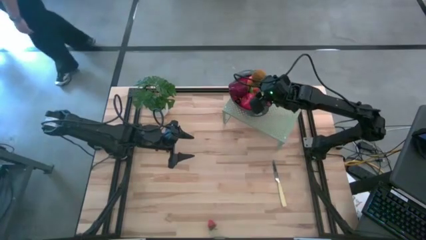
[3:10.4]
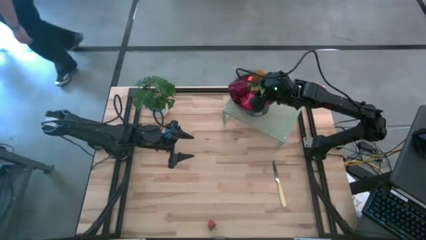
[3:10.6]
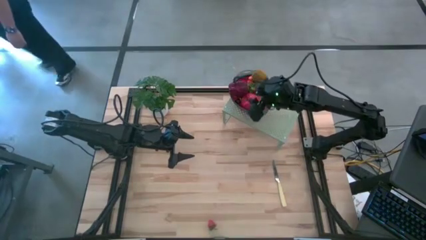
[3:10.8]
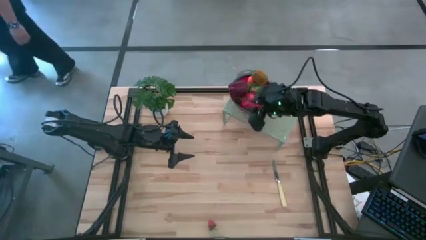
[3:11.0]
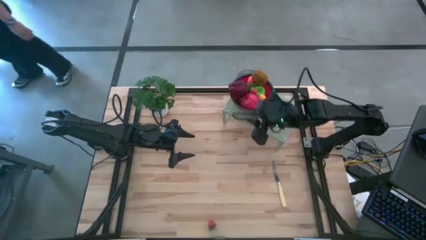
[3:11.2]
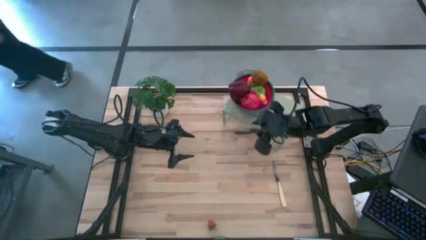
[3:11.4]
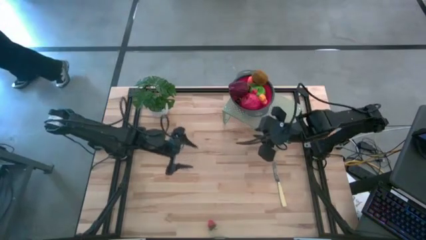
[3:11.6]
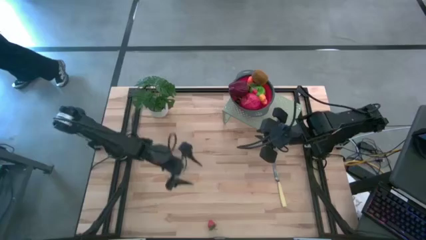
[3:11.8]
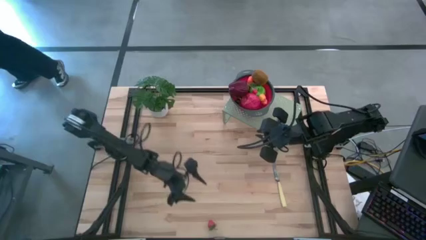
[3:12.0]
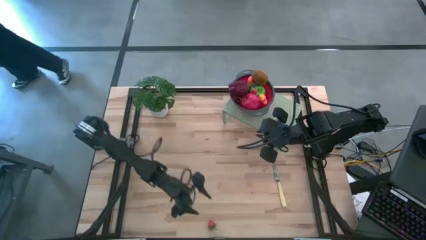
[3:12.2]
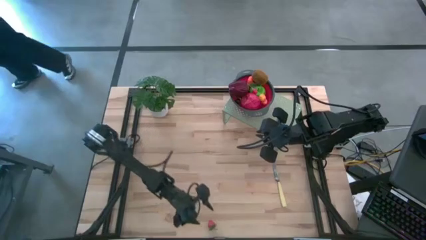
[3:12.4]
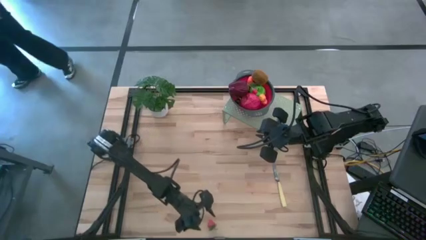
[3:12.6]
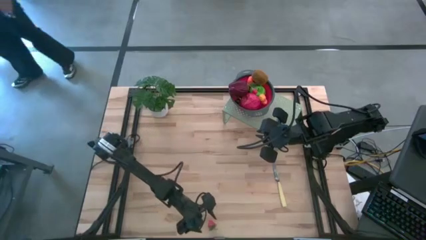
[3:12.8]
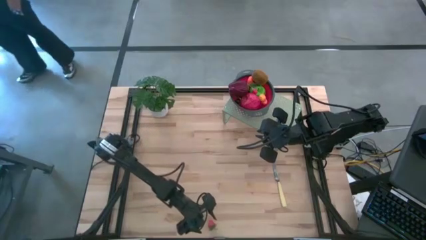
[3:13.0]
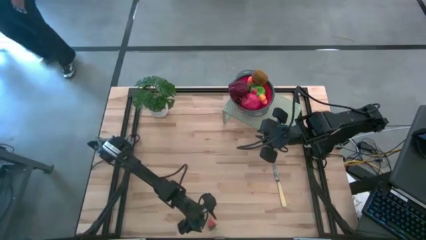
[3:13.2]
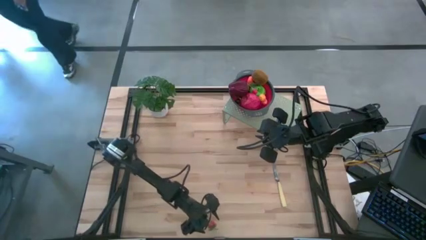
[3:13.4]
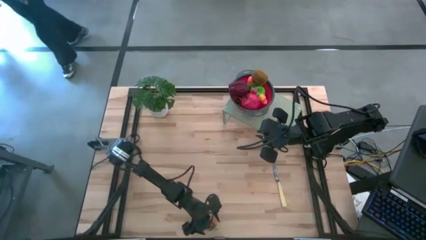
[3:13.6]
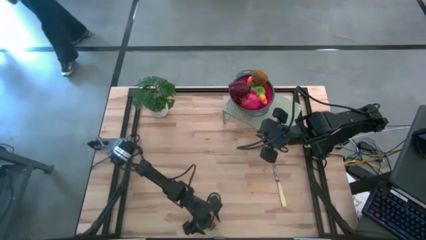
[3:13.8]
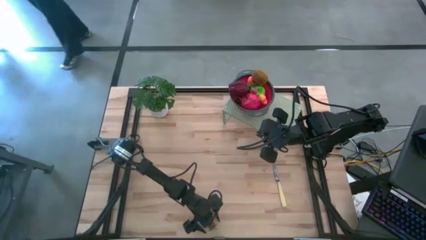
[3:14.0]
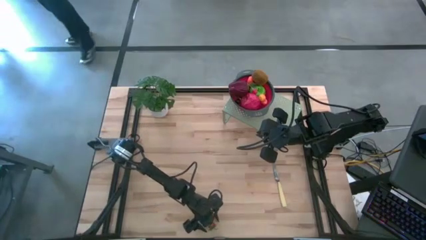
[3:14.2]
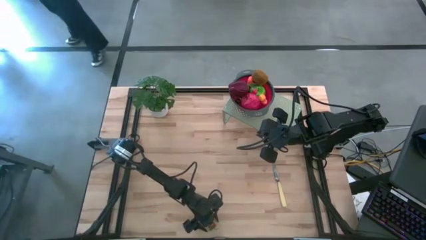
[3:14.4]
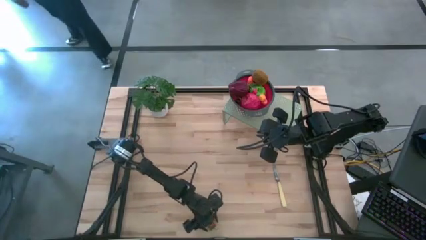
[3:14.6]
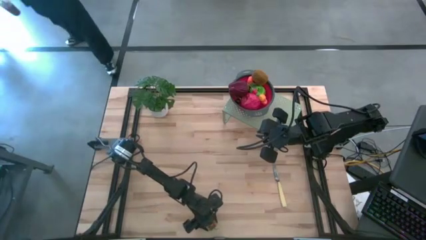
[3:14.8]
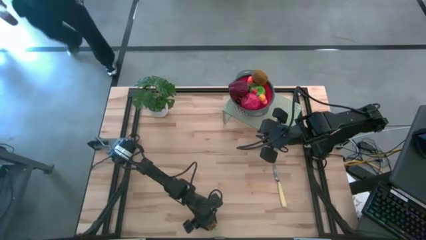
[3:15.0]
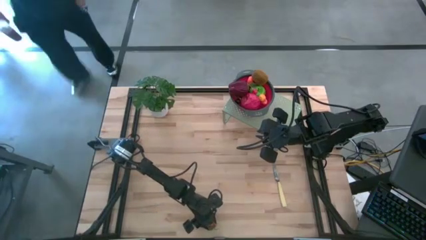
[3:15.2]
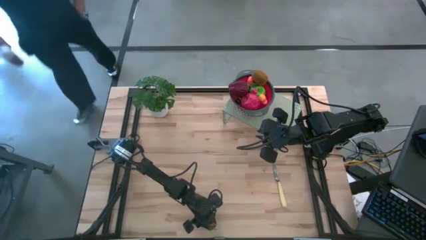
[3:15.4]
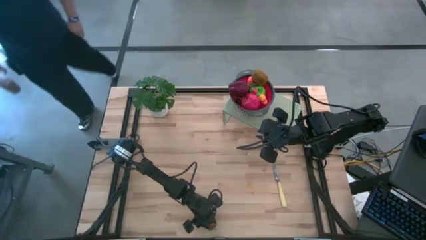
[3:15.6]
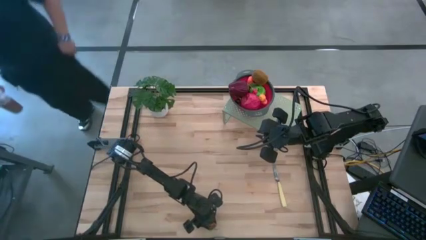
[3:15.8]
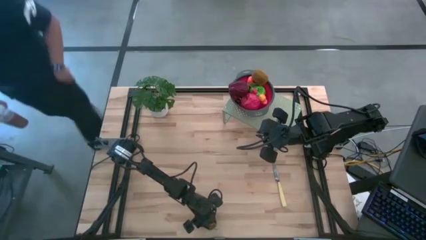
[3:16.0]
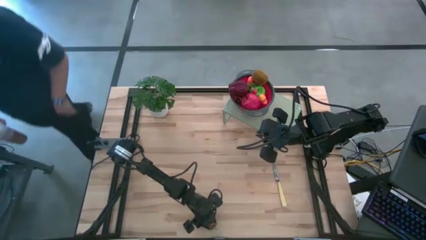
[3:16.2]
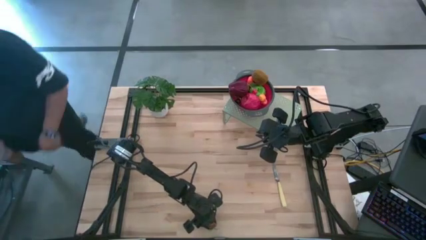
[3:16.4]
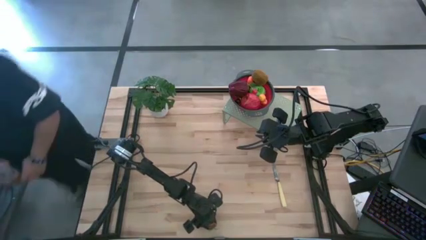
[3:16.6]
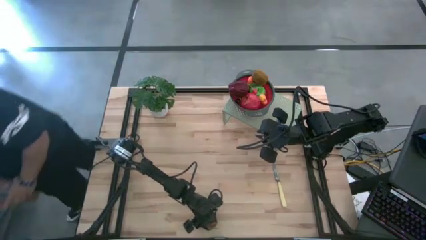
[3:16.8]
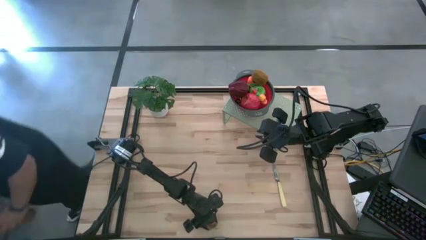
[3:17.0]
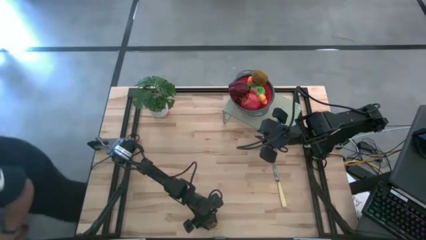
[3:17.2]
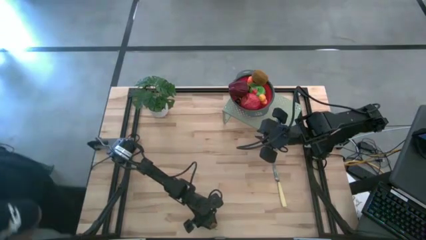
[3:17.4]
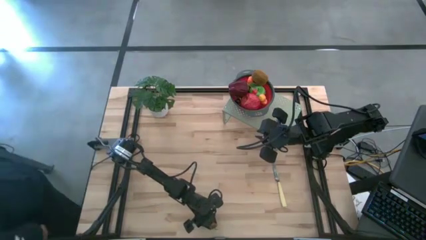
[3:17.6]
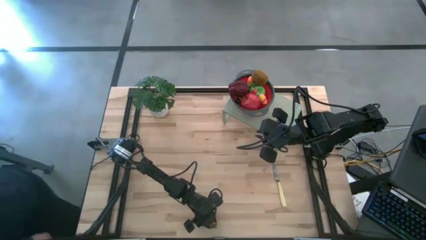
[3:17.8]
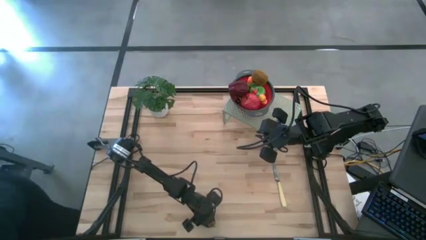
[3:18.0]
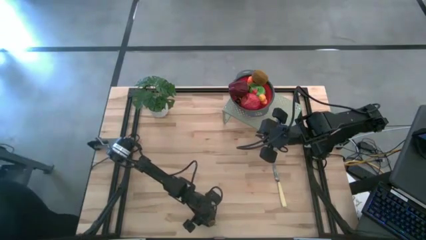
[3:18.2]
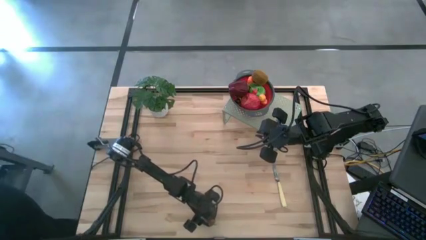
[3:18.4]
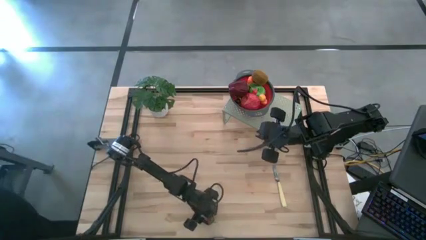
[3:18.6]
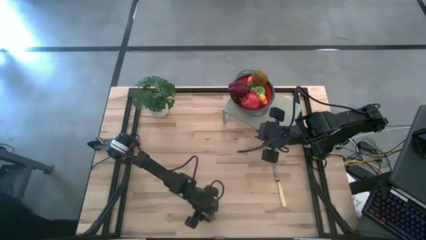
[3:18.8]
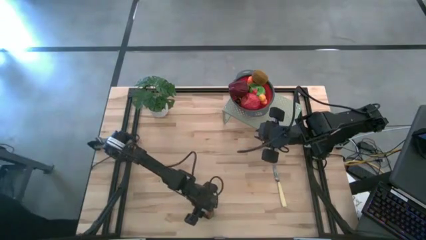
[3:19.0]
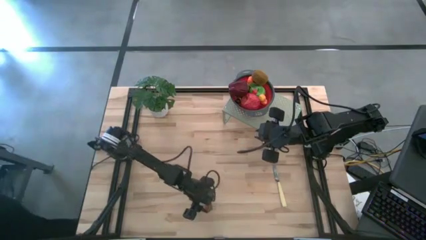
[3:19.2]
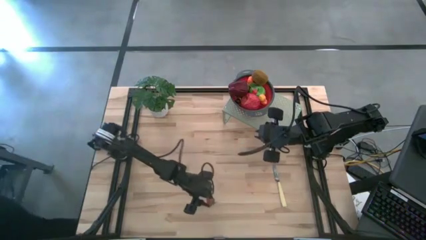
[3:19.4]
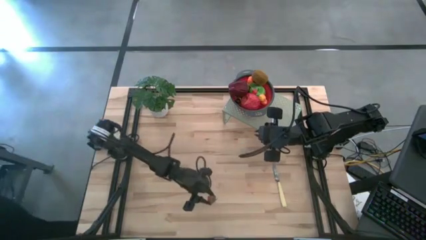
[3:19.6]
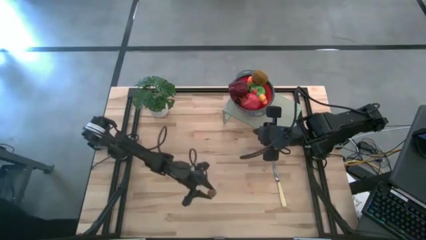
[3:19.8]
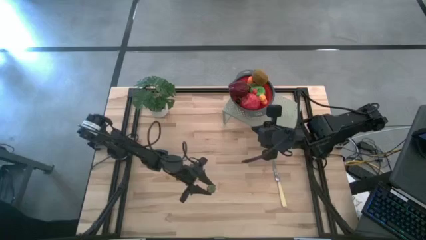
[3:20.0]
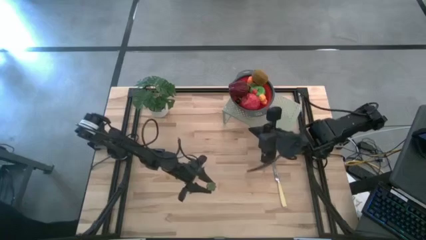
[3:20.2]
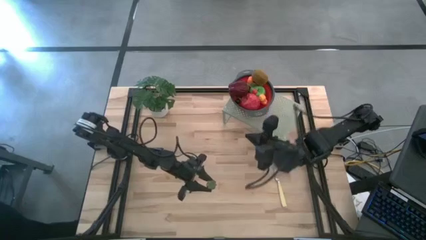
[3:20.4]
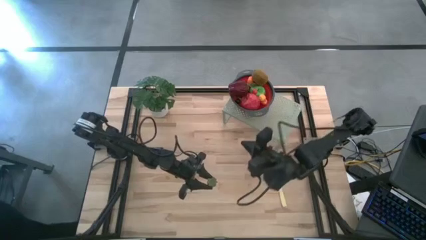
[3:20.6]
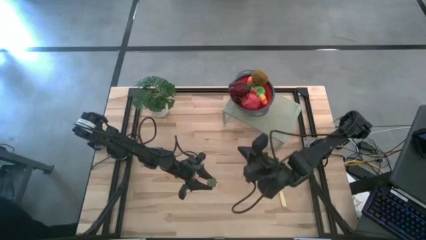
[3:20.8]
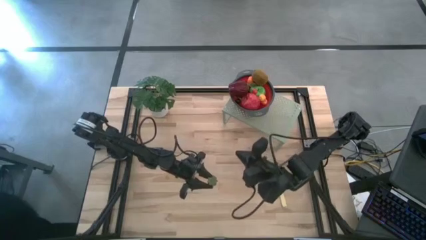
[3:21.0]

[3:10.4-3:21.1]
Task: Pick & Place Fruit
Put the red strawberry into the red strainer bowl
